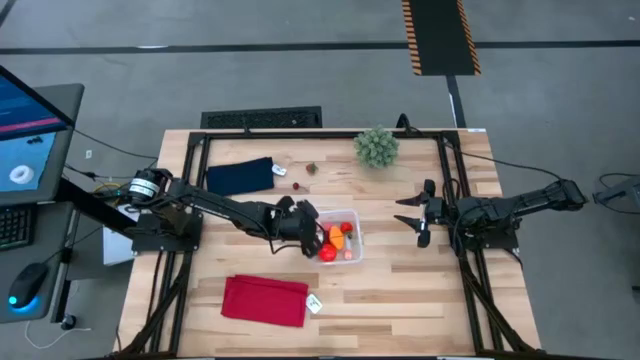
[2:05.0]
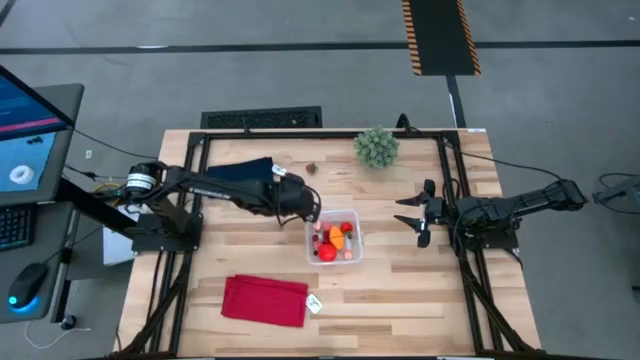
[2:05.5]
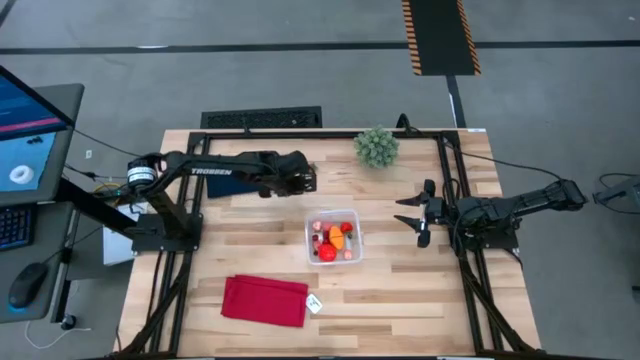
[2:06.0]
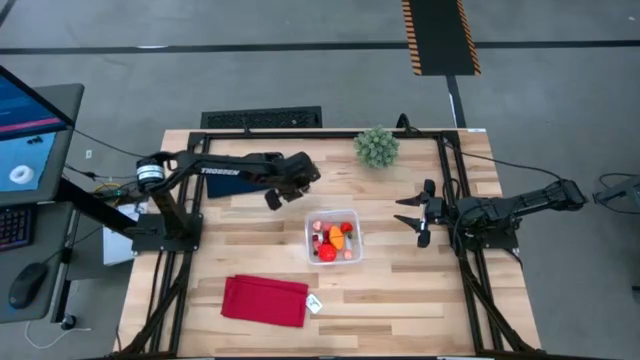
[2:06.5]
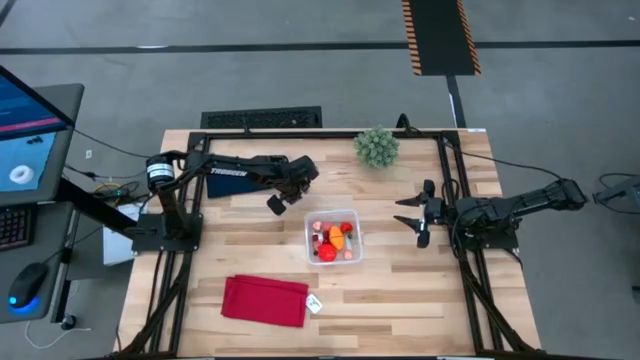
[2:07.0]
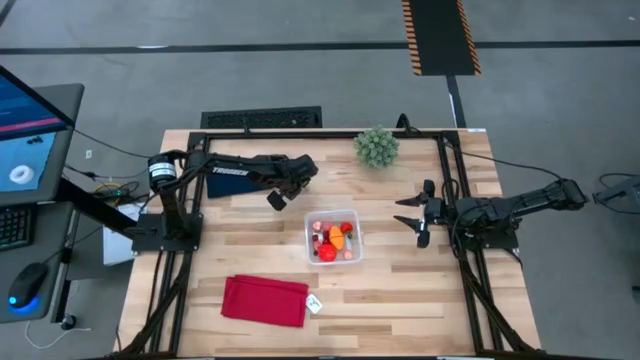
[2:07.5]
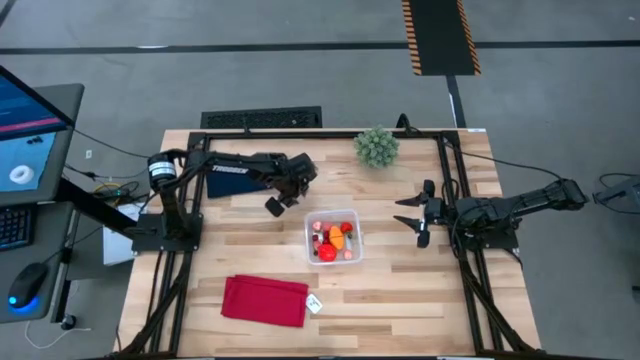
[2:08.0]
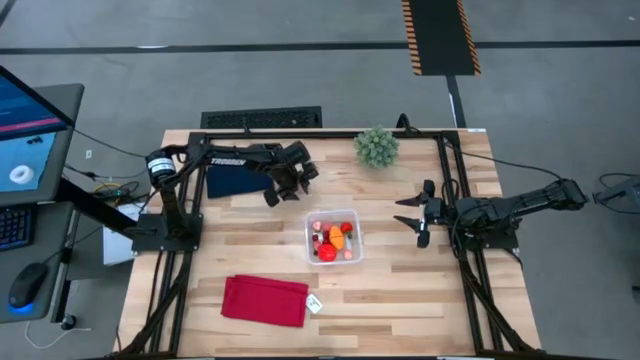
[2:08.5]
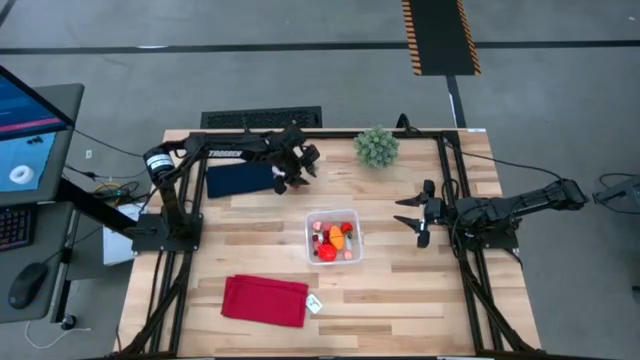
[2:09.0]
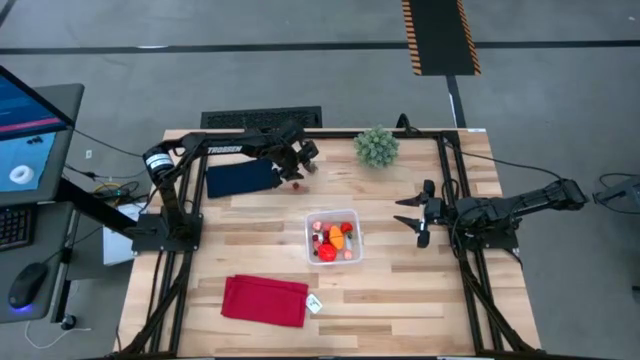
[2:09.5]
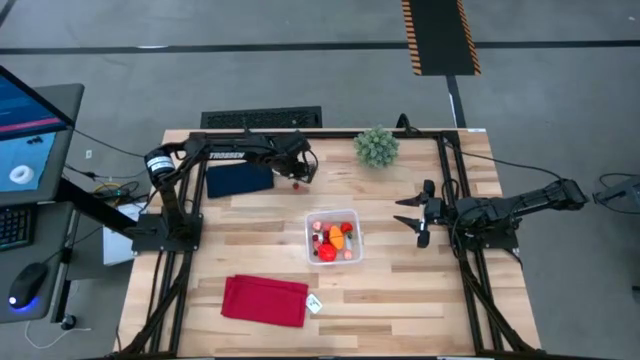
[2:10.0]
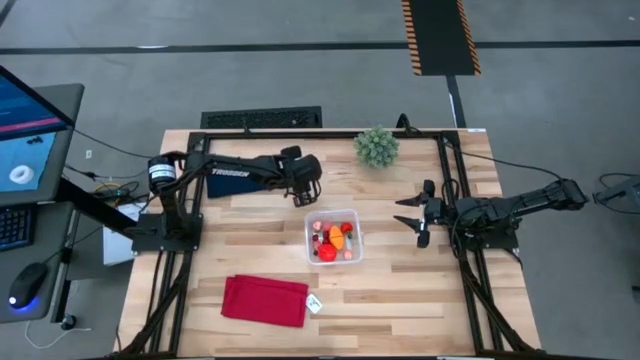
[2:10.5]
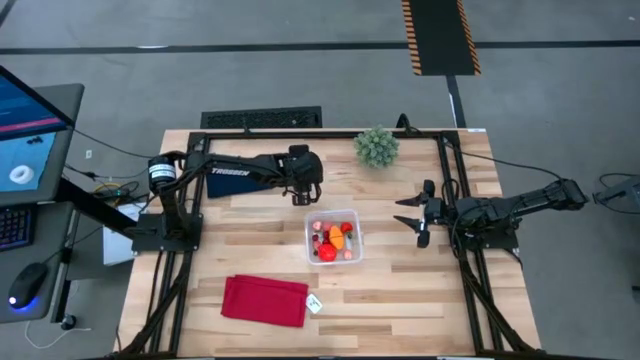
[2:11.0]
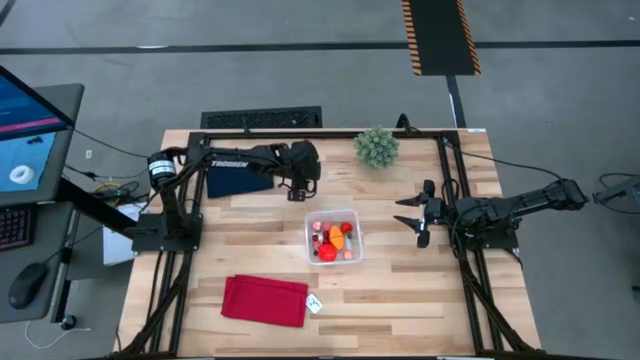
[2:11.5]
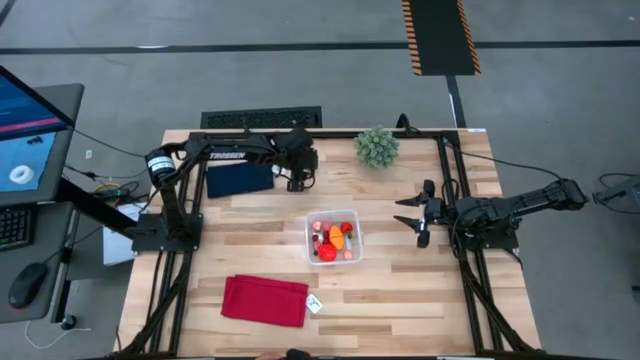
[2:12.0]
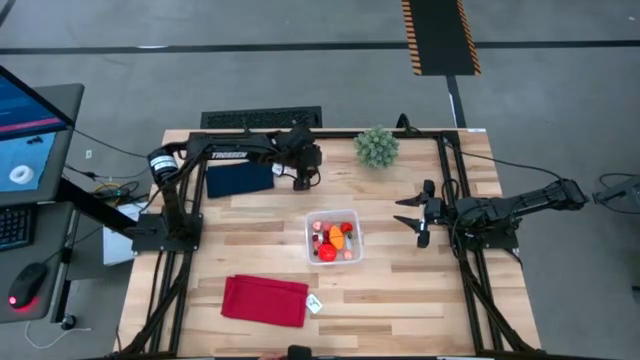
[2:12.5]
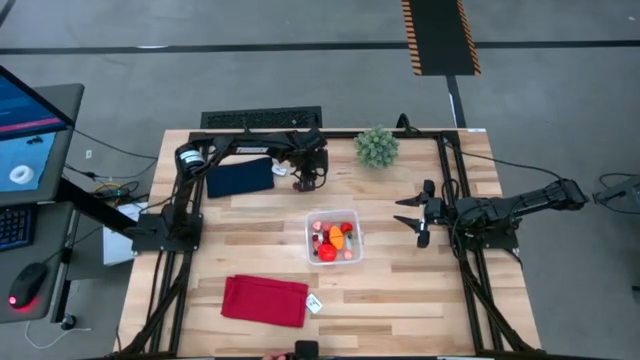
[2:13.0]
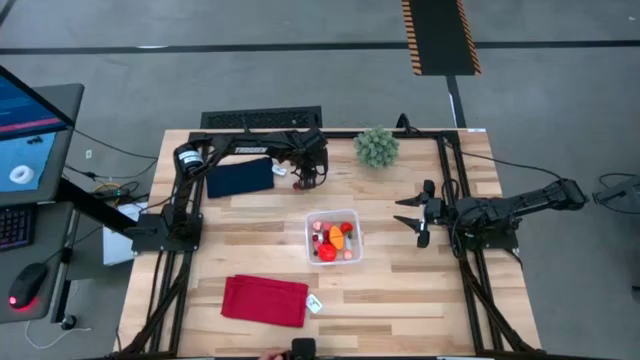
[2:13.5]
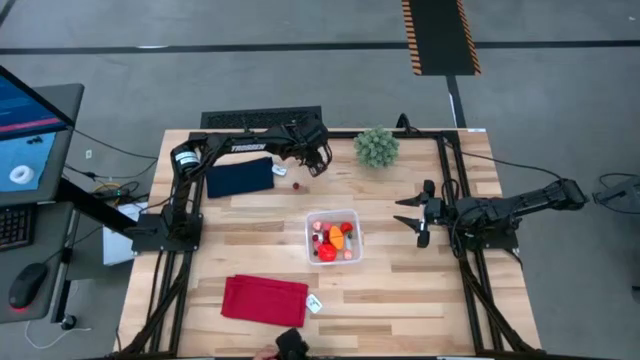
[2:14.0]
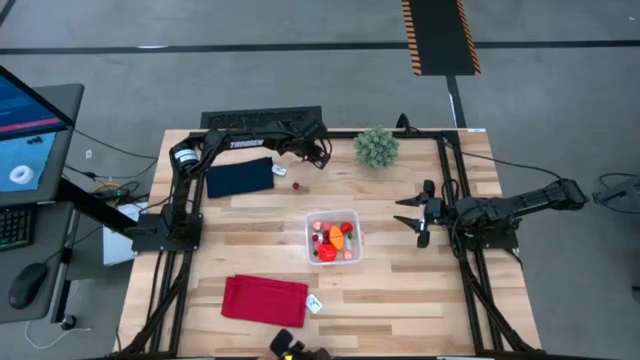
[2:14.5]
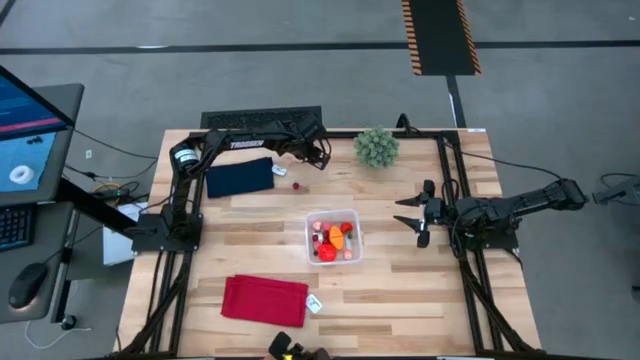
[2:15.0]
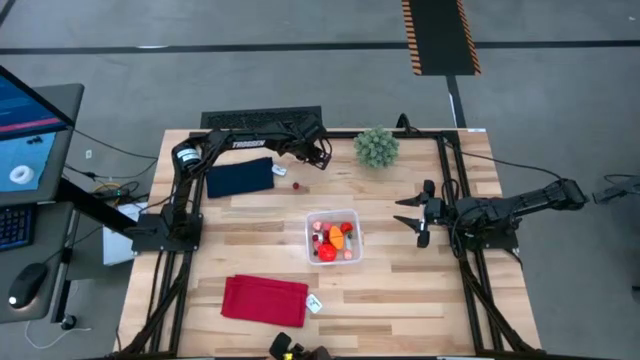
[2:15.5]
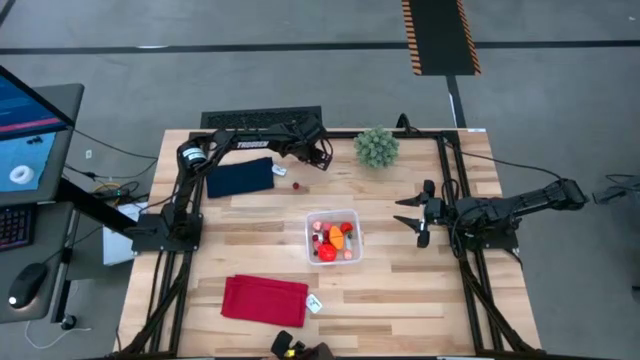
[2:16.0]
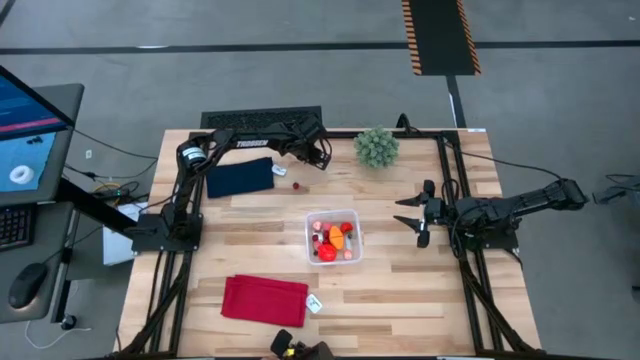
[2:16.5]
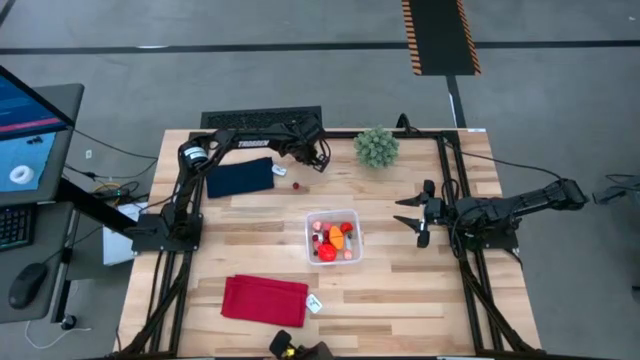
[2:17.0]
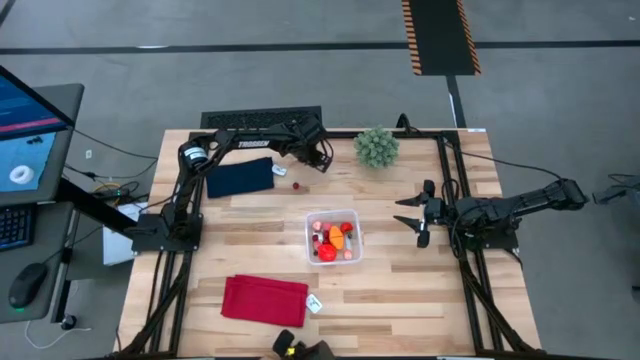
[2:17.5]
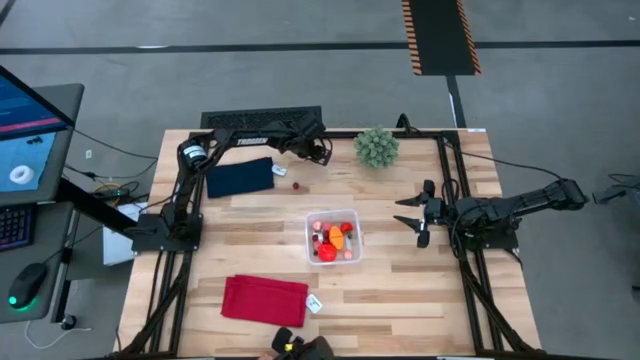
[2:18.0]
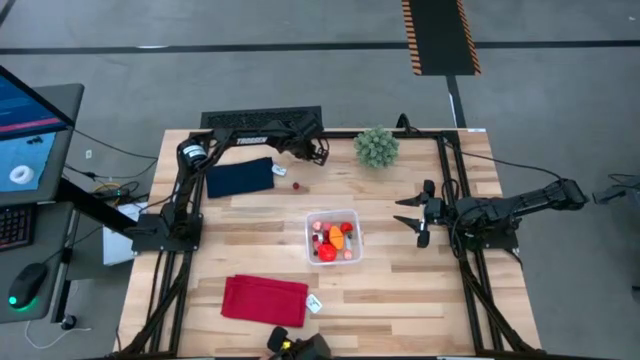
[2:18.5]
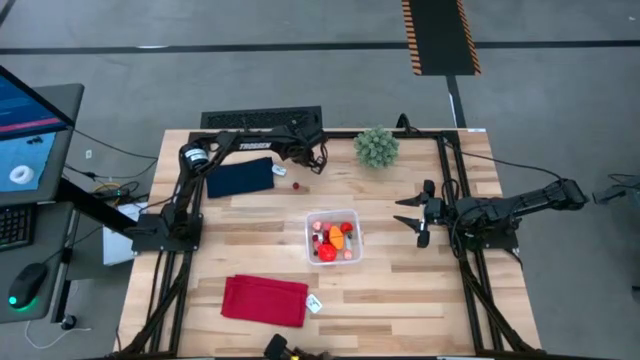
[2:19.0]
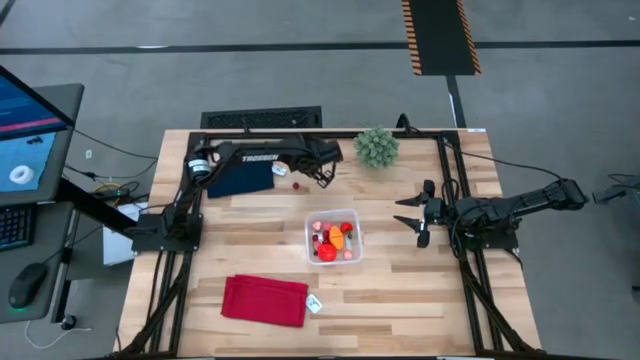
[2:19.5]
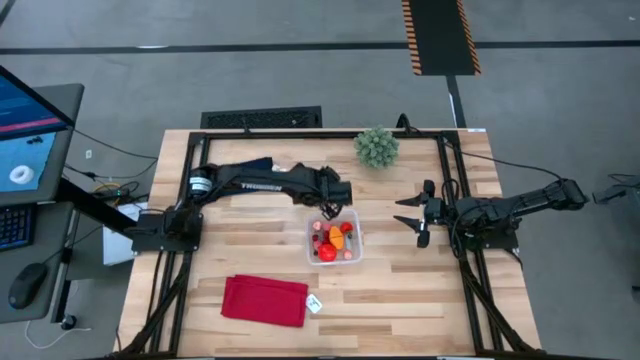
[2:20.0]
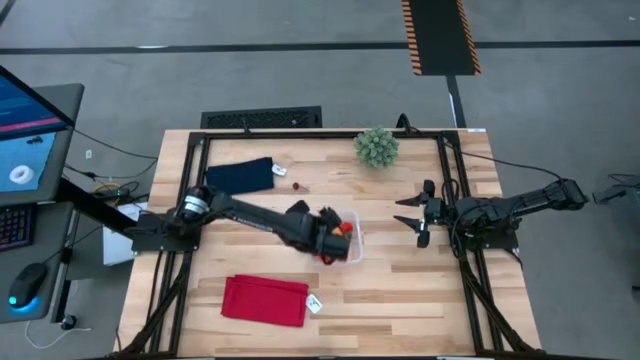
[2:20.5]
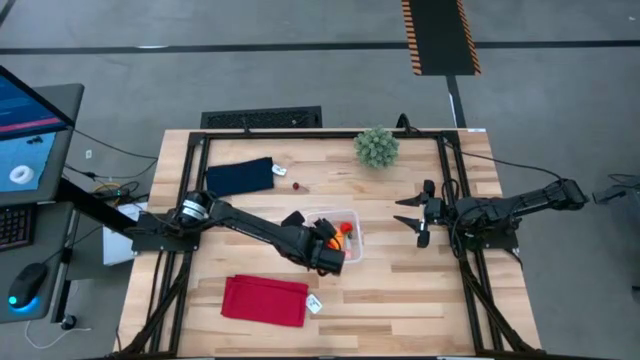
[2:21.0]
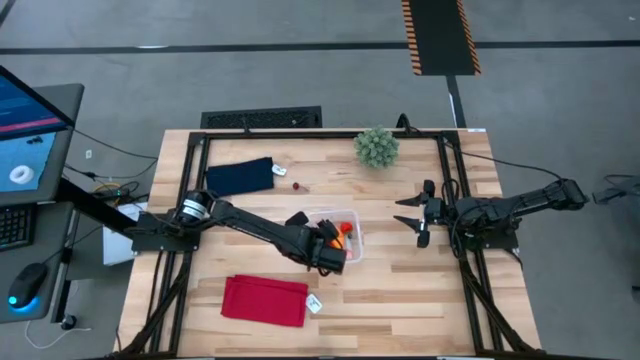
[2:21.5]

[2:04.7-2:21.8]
Task: Pick and placing Produce into tupperware
Put the red strawberry into the transparent bin

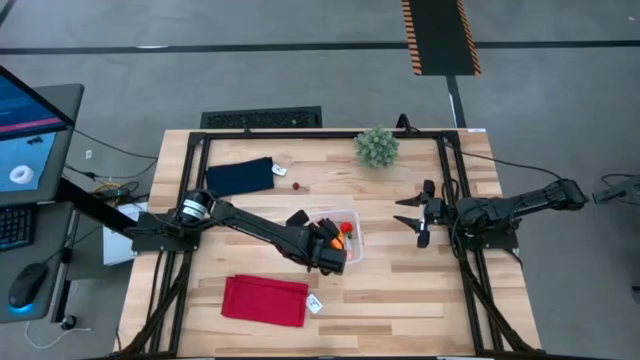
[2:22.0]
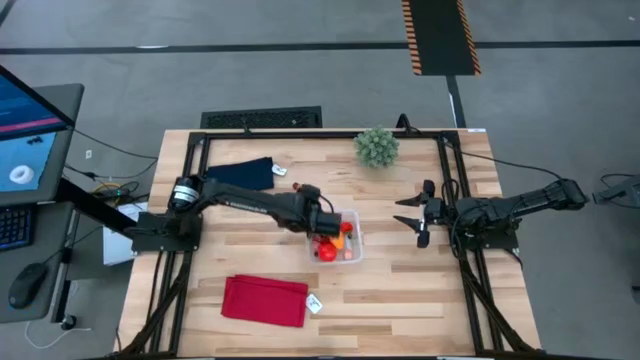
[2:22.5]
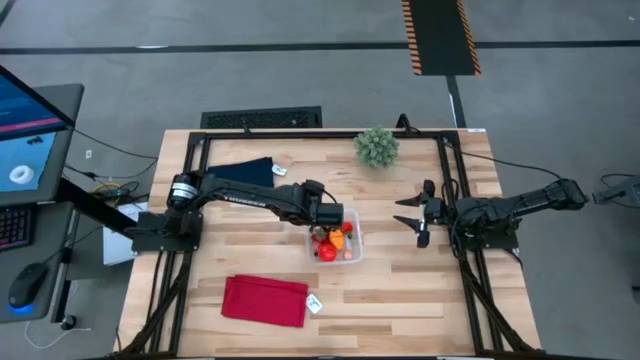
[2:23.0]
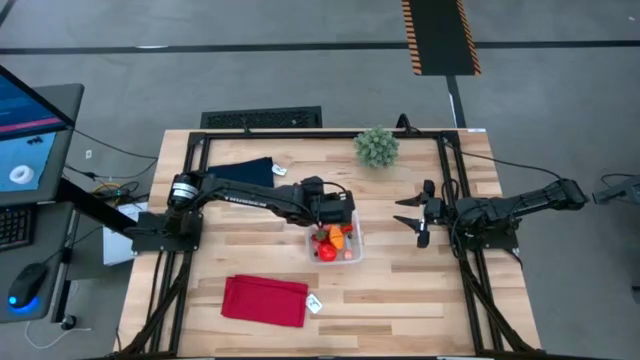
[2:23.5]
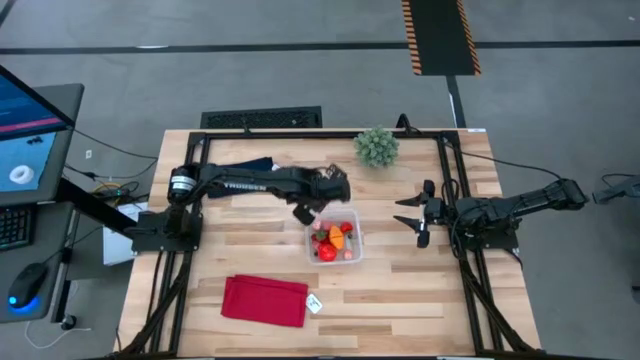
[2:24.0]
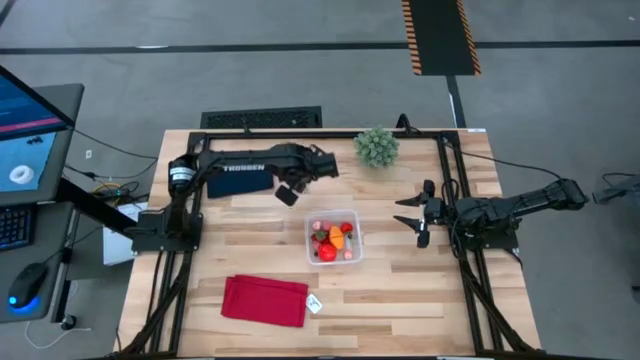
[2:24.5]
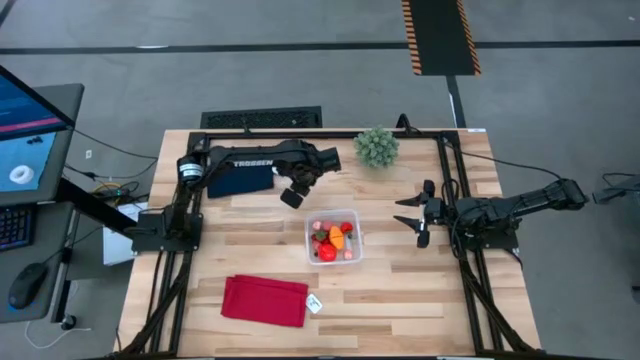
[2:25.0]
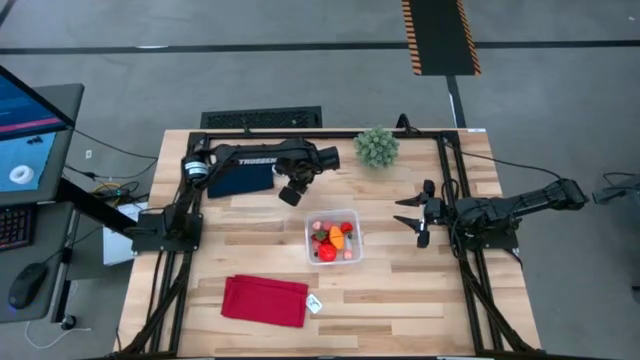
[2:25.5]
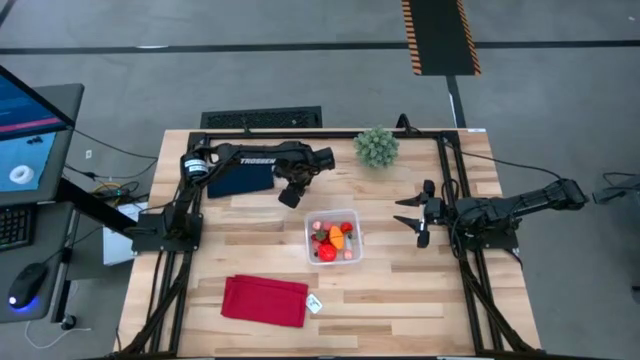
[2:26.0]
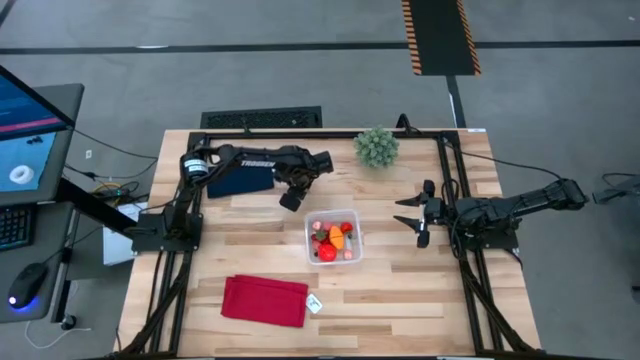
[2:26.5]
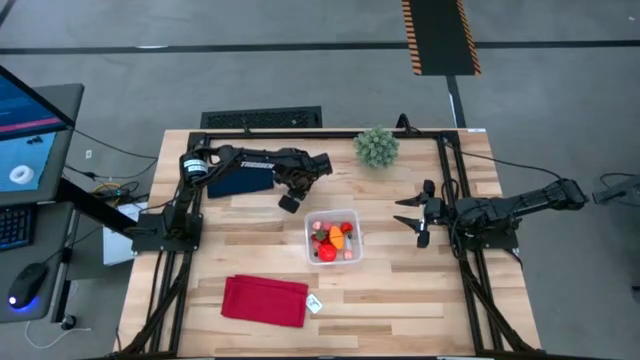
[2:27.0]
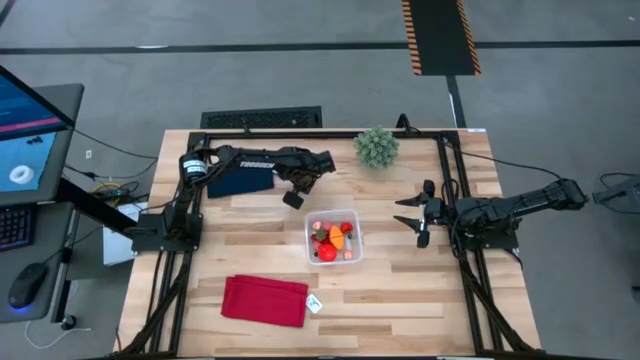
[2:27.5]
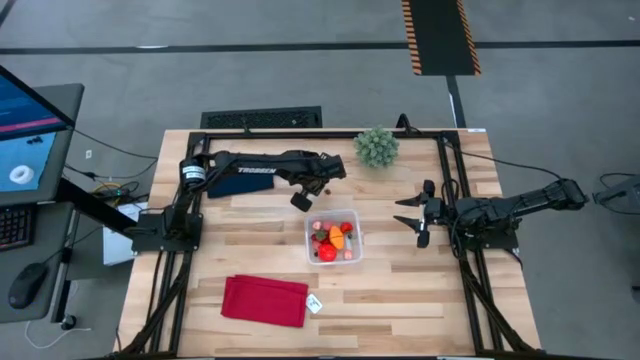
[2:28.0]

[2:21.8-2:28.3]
Put the red cherry into the transparent bin
